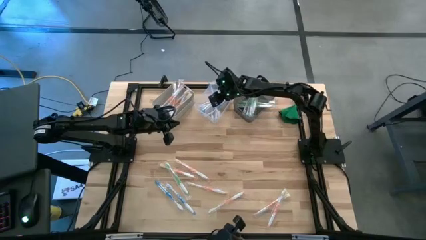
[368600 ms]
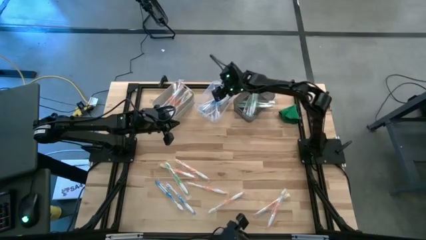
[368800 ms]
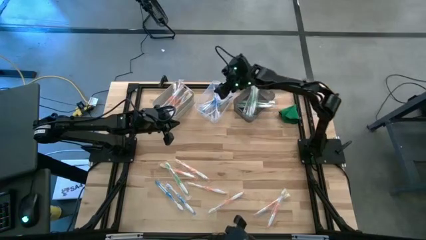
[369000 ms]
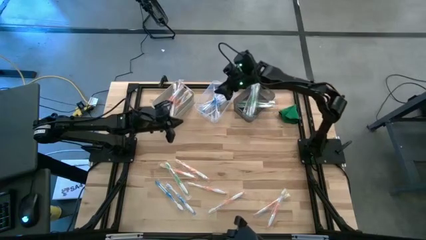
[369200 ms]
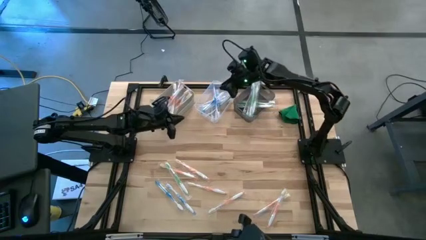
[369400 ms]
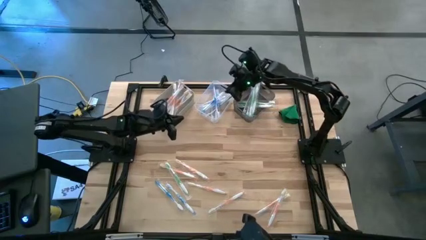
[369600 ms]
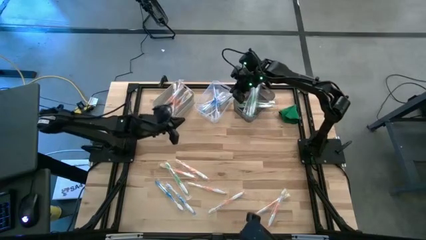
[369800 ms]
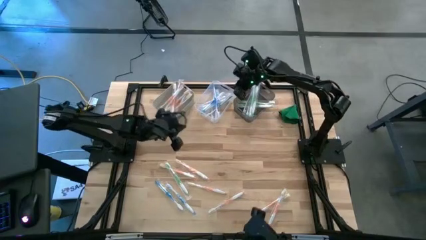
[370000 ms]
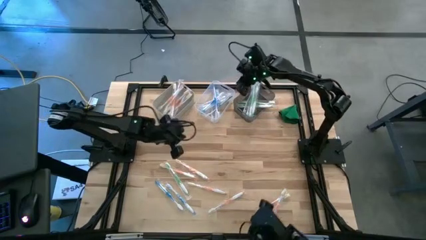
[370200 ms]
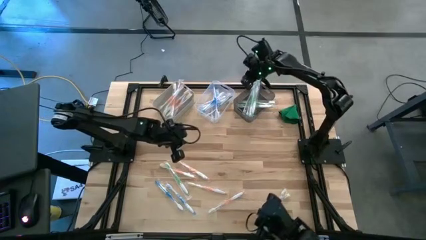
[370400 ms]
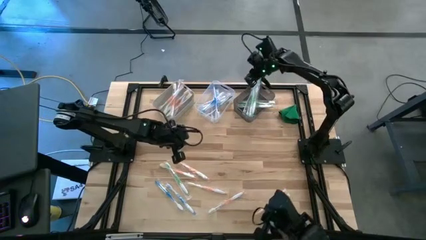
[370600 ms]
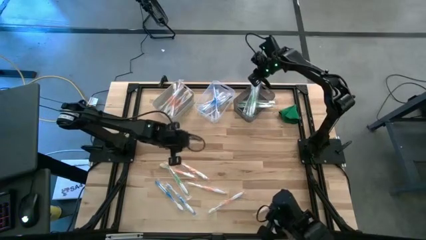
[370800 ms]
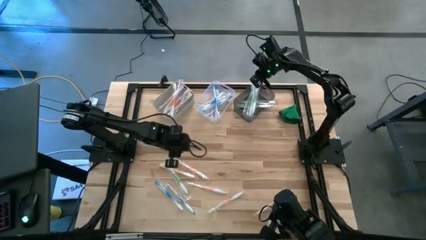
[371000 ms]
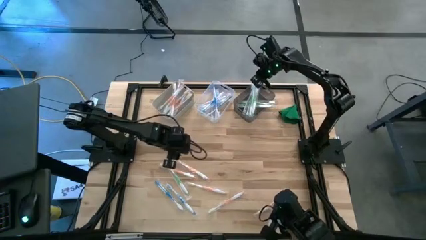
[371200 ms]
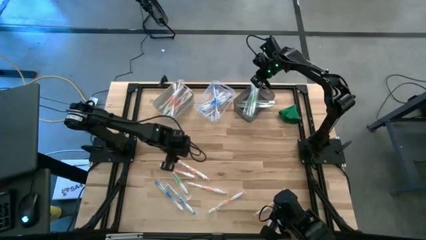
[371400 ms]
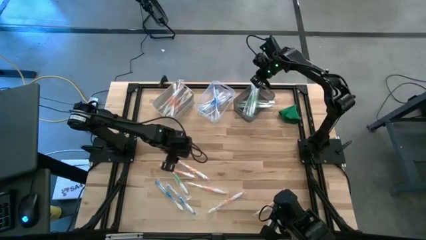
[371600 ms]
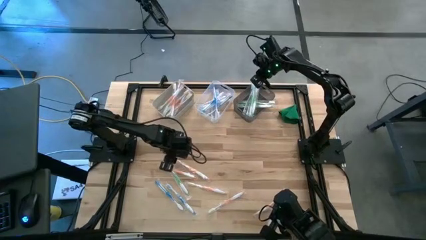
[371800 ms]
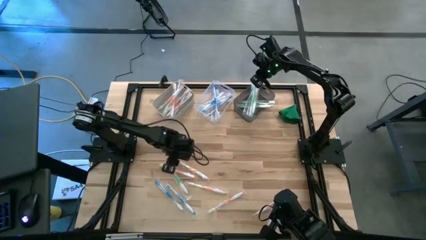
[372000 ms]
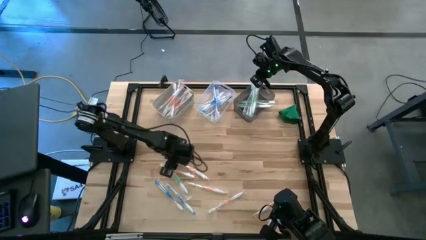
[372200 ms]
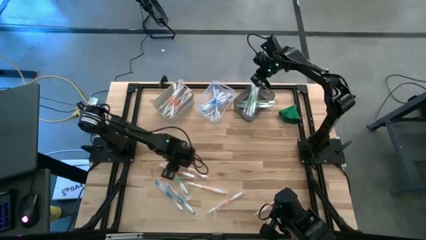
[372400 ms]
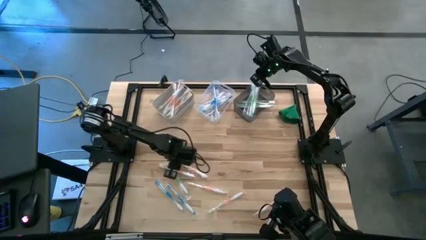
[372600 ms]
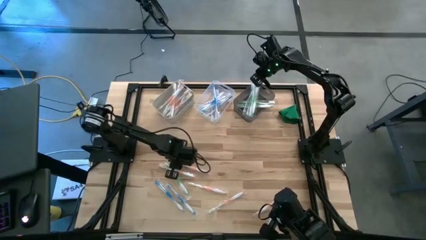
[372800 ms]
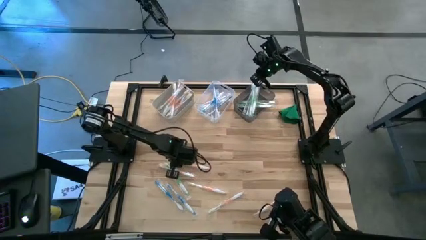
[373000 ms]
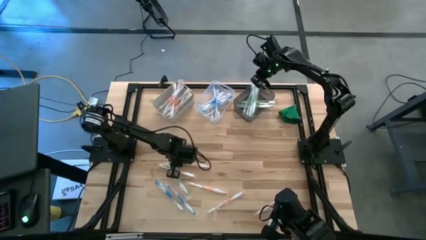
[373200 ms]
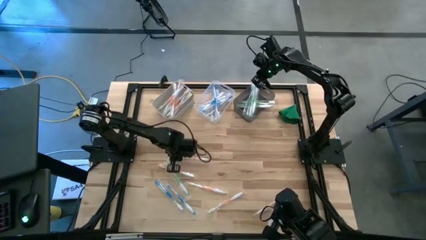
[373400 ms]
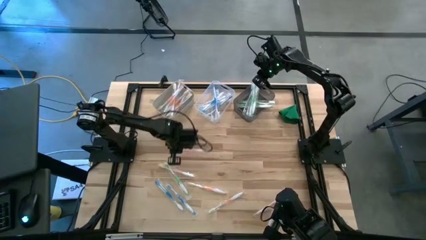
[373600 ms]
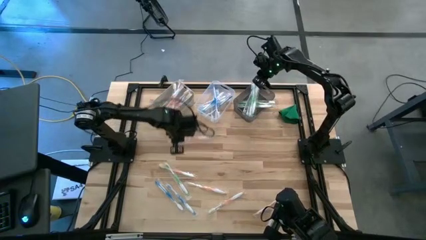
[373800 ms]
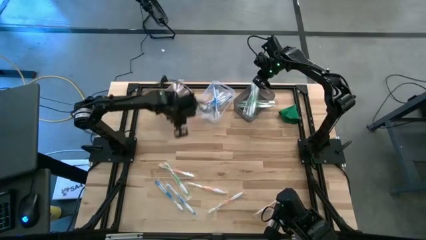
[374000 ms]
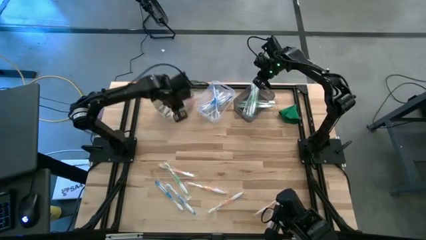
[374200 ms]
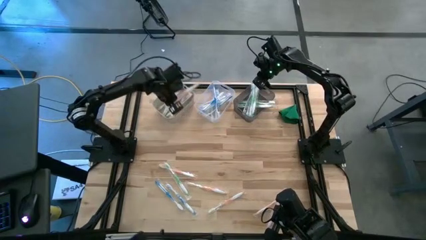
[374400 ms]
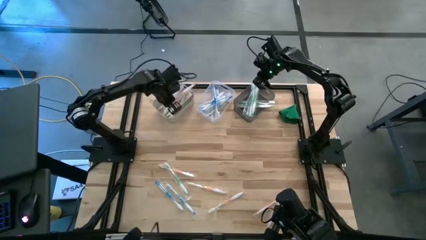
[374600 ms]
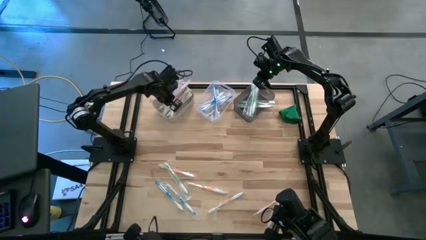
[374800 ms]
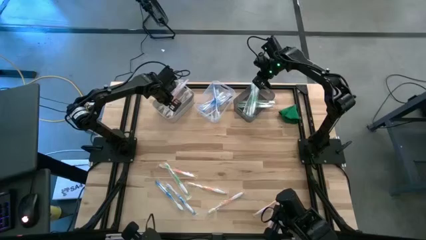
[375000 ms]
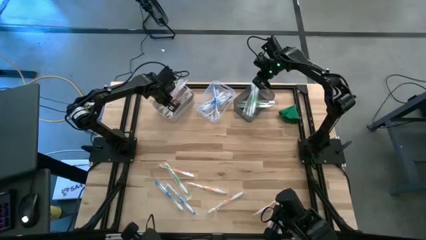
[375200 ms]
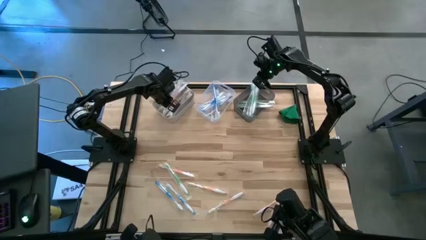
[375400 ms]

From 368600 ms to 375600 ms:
Task: Pick & Place Toothbrushes
Put the orange toothbrush into the white bin

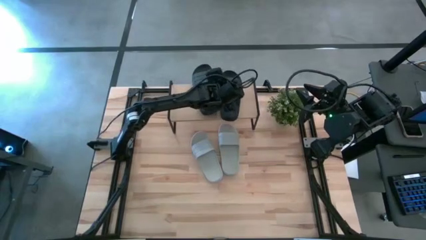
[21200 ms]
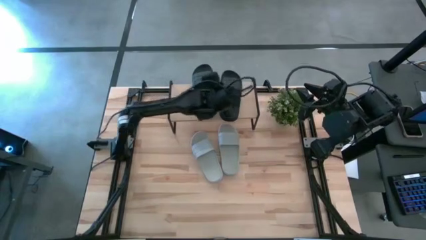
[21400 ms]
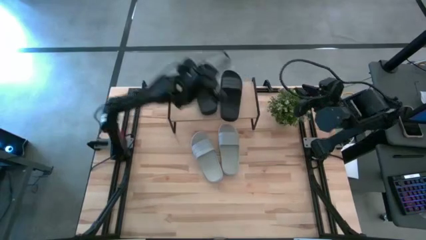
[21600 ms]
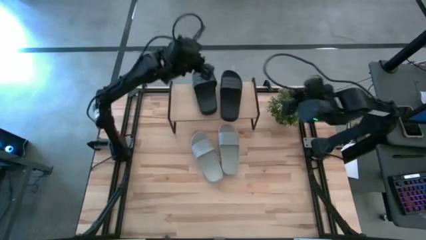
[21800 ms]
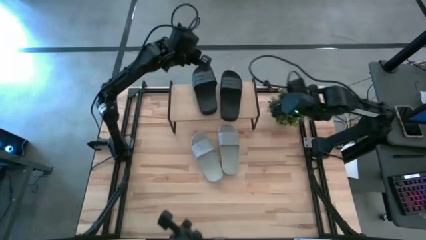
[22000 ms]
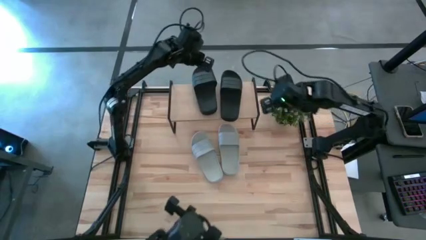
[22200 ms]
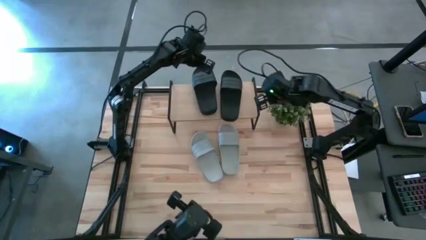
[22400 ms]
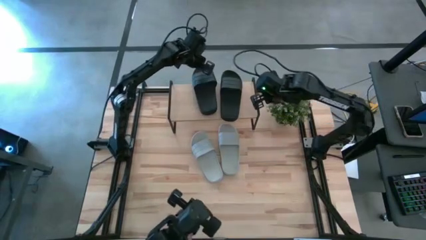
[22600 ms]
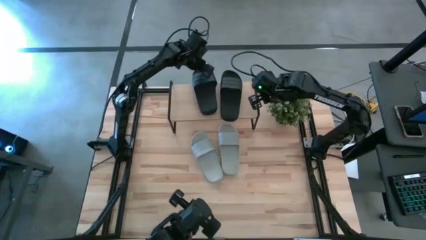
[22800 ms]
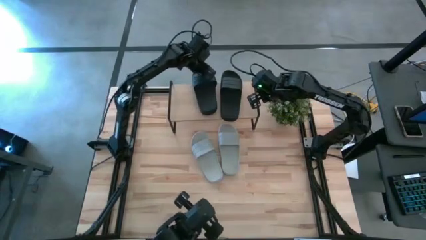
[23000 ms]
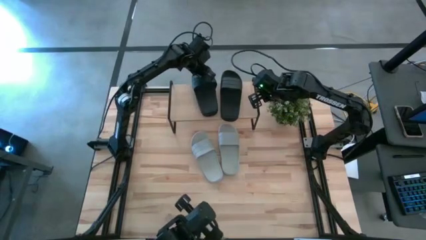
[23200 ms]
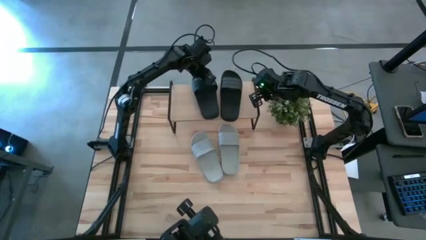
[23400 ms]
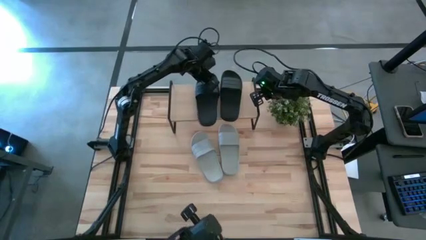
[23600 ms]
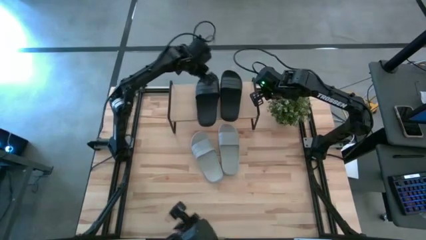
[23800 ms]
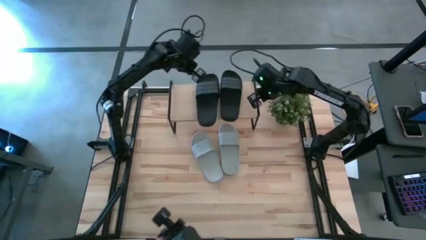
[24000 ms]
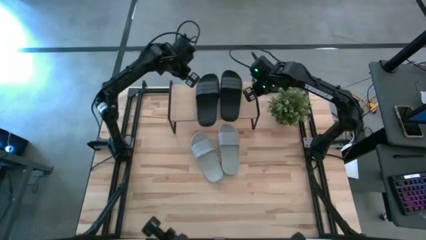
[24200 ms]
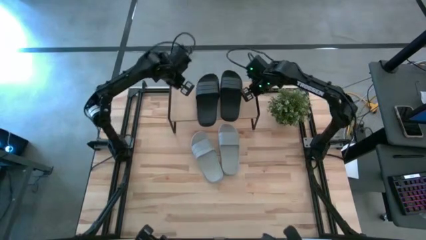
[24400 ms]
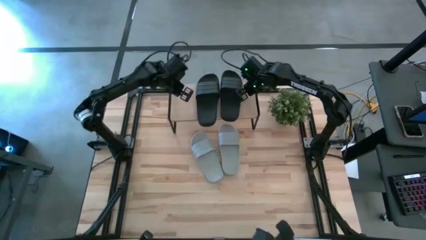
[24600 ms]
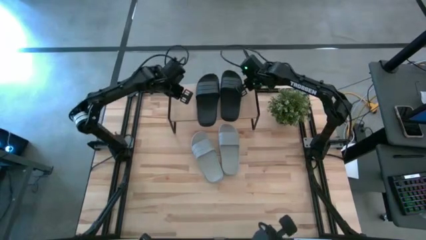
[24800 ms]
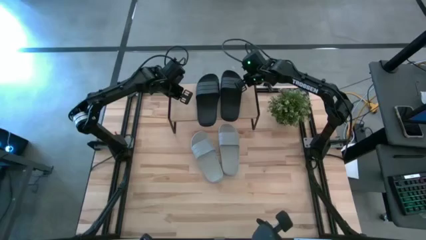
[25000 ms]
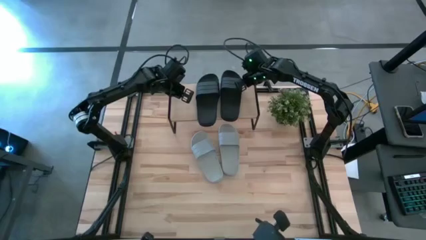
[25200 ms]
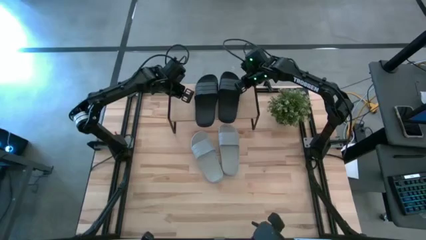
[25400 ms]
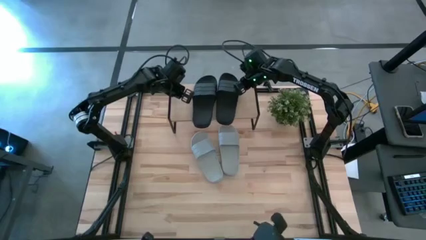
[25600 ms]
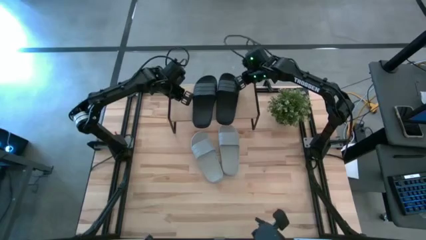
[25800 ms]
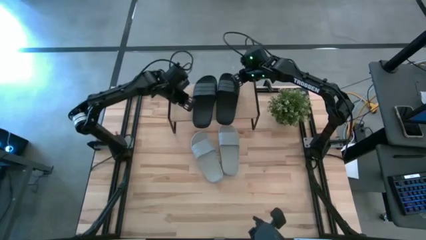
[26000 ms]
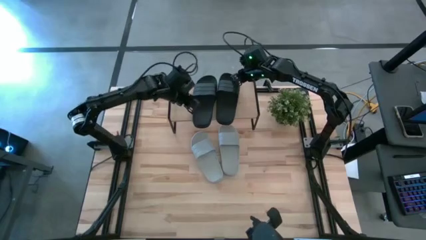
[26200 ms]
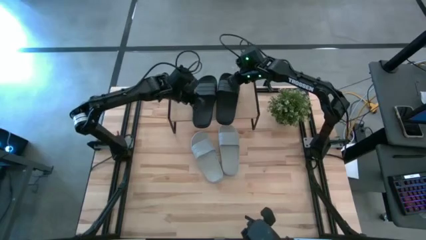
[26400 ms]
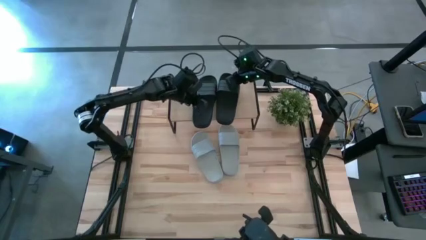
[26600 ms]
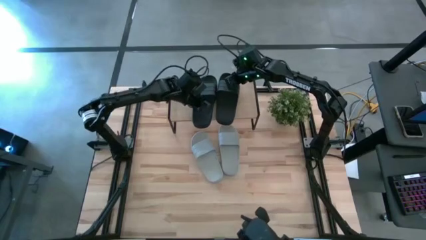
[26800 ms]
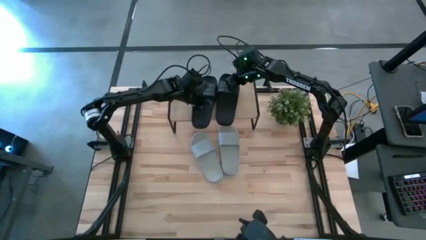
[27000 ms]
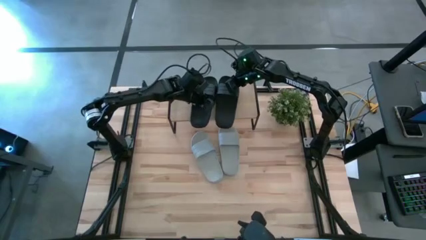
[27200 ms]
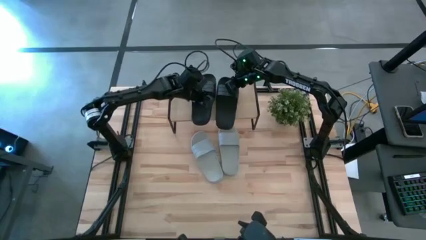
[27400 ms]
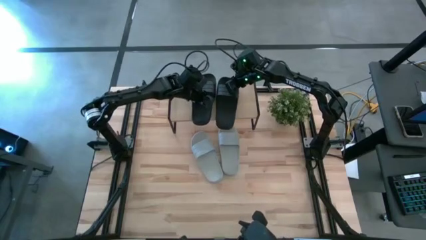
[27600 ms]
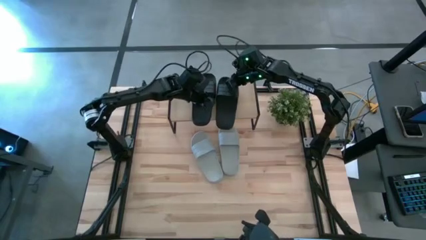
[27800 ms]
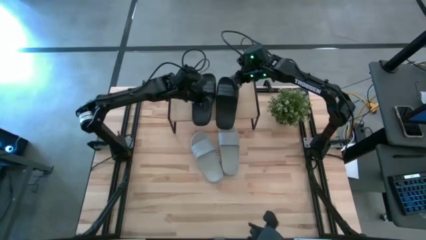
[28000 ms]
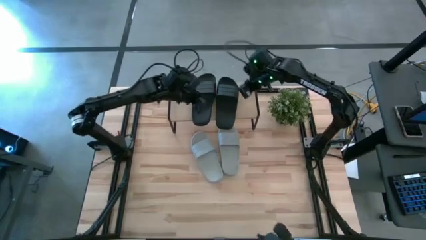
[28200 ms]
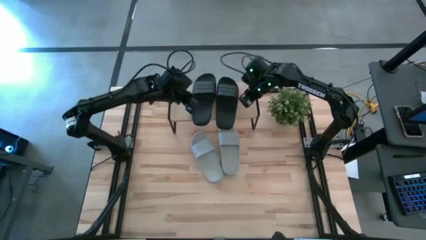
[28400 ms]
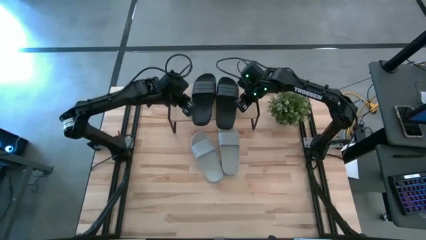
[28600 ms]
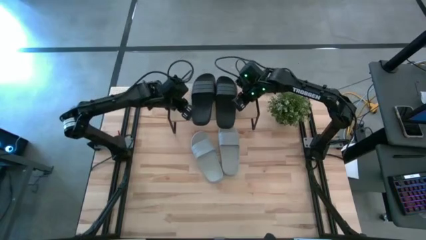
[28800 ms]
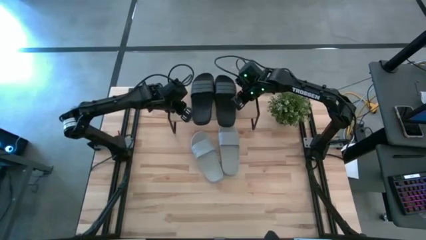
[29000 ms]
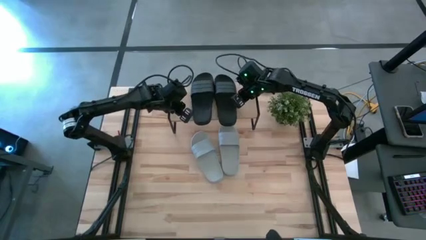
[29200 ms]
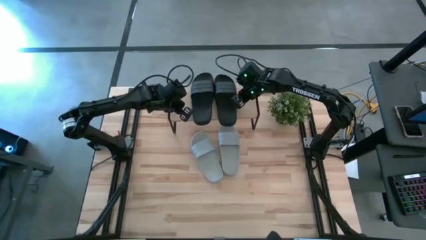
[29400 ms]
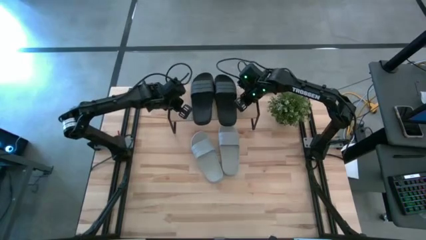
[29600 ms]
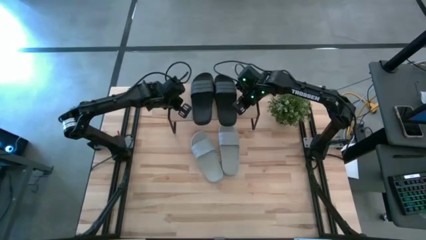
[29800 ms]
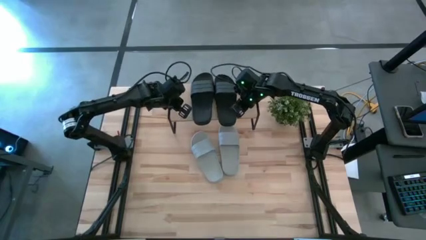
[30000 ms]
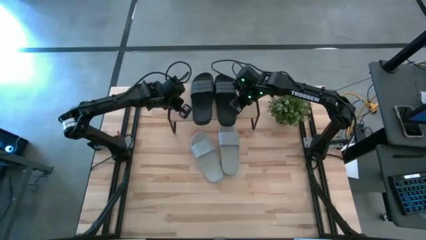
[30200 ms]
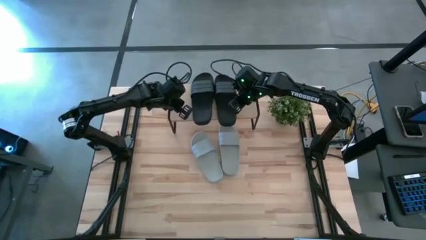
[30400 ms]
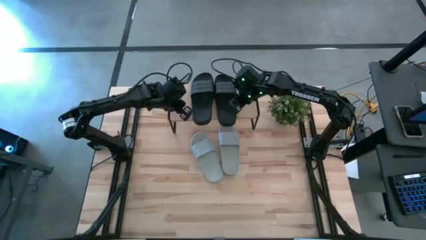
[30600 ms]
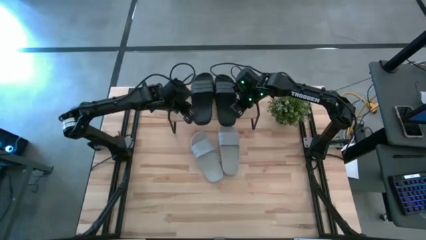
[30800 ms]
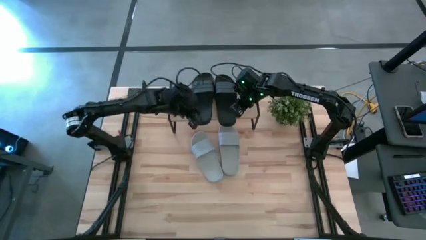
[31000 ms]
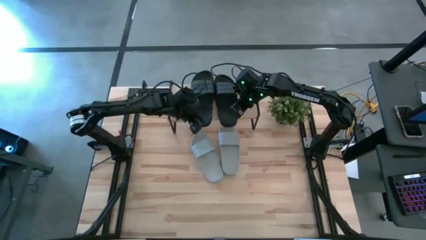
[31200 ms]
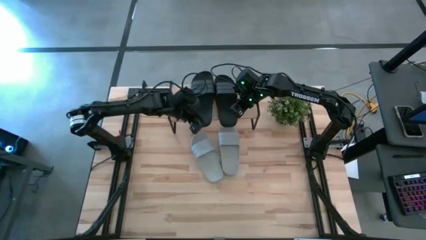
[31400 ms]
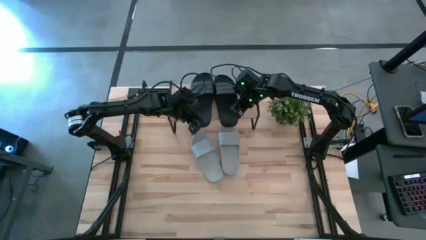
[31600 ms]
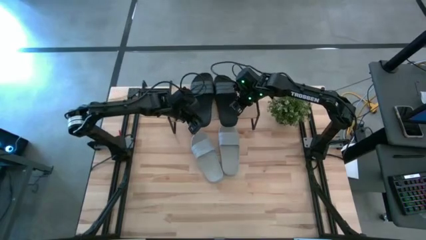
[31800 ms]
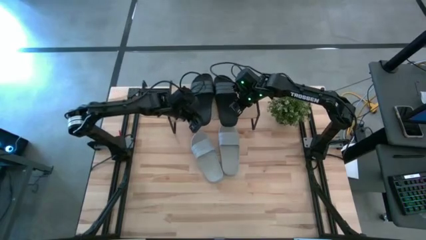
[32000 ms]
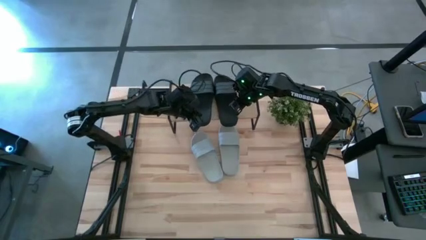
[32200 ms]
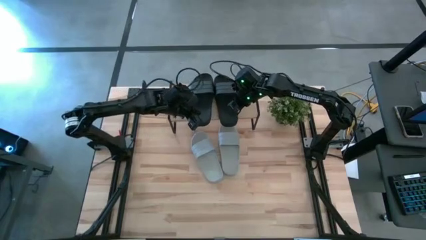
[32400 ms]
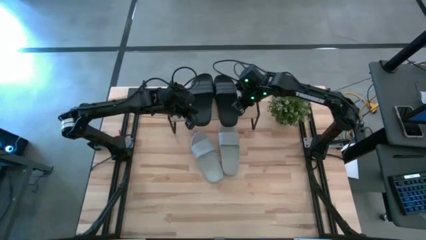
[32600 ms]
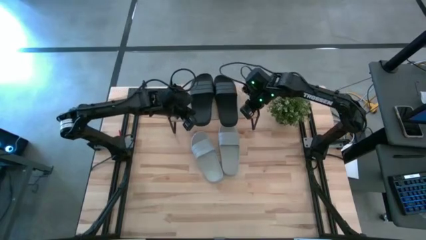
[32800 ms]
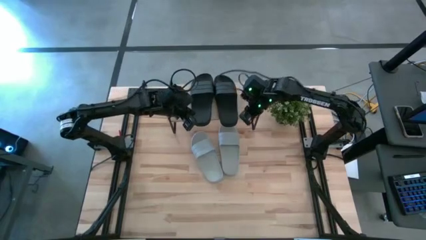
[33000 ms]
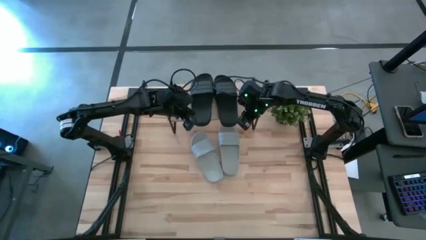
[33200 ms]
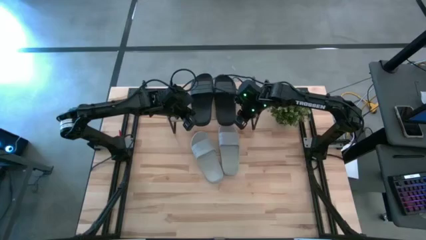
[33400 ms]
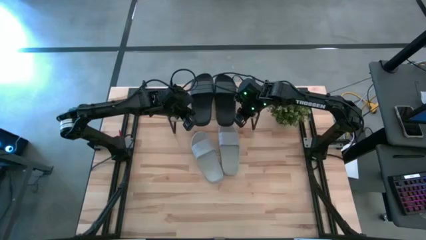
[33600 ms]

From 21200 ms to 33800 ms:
Task: Pick and place slides into the shelf
Adjust the black slippers on the shelf
